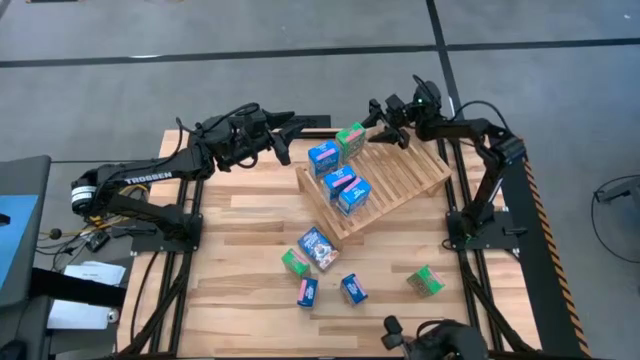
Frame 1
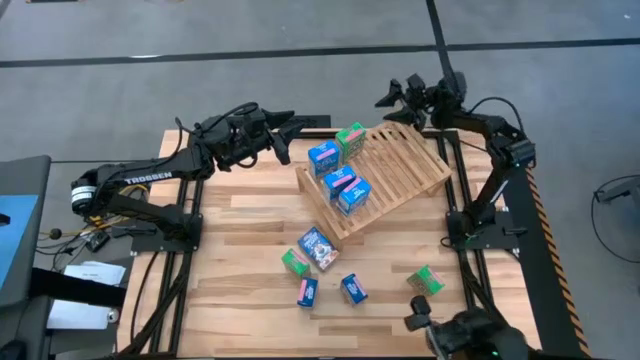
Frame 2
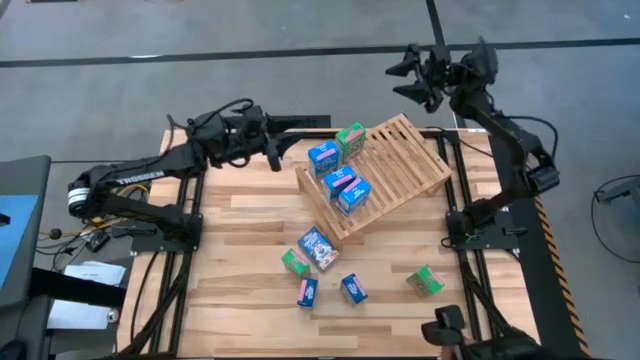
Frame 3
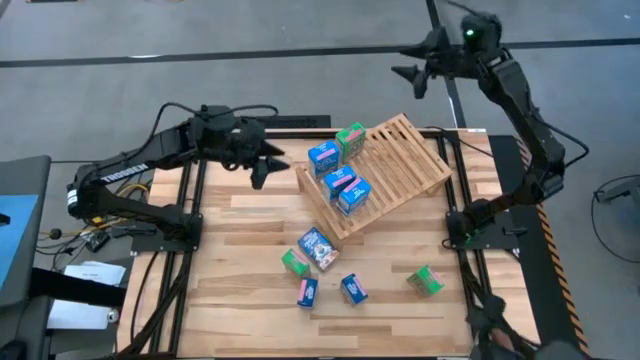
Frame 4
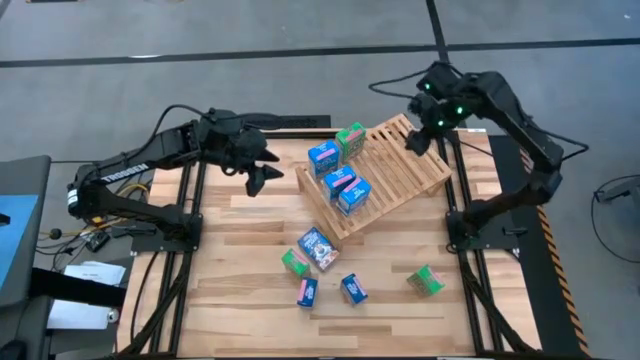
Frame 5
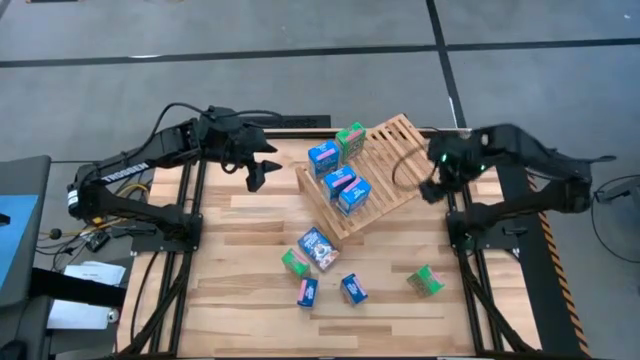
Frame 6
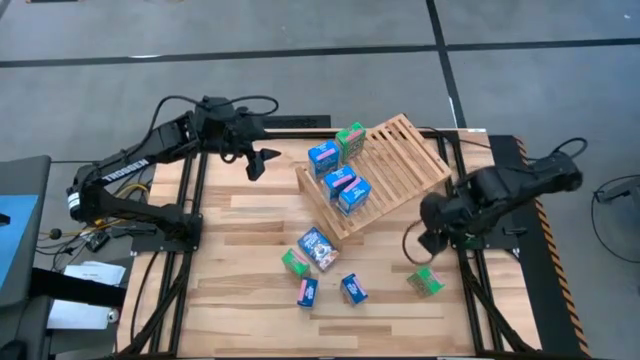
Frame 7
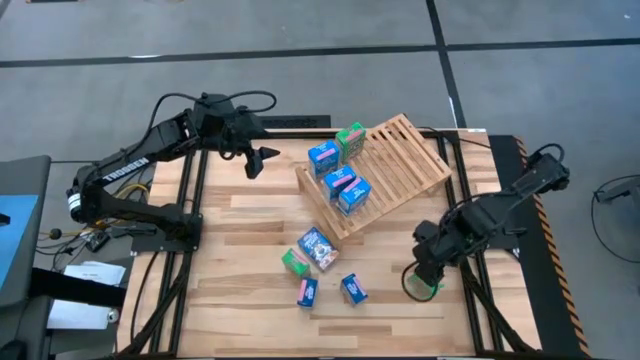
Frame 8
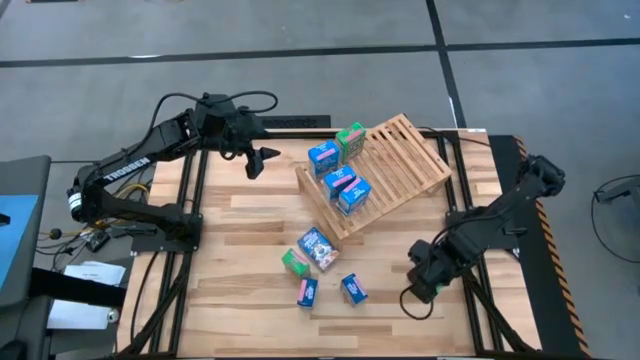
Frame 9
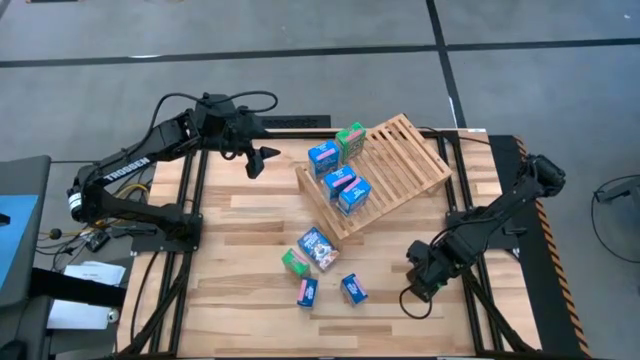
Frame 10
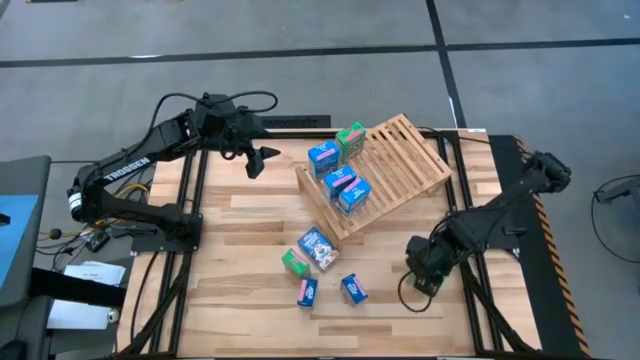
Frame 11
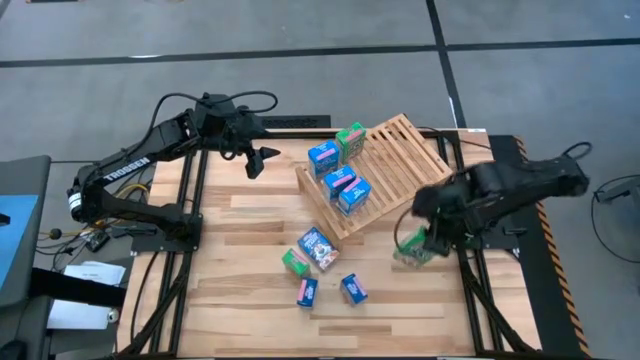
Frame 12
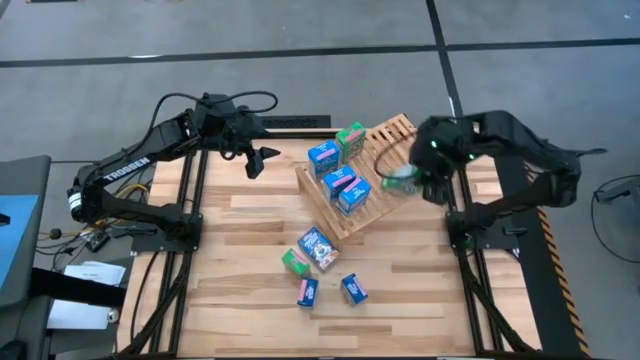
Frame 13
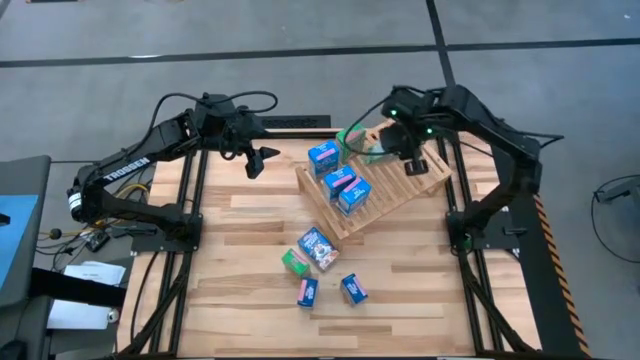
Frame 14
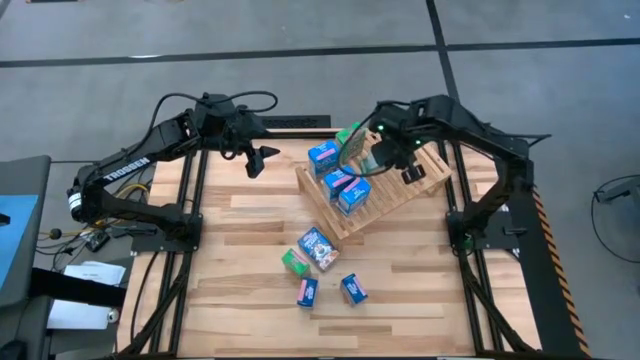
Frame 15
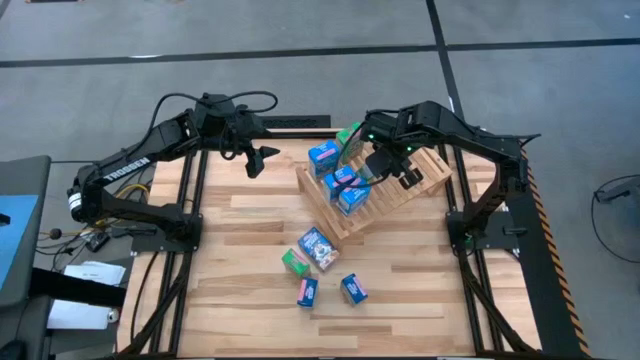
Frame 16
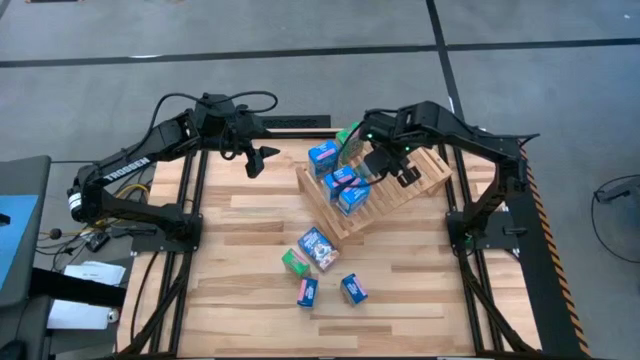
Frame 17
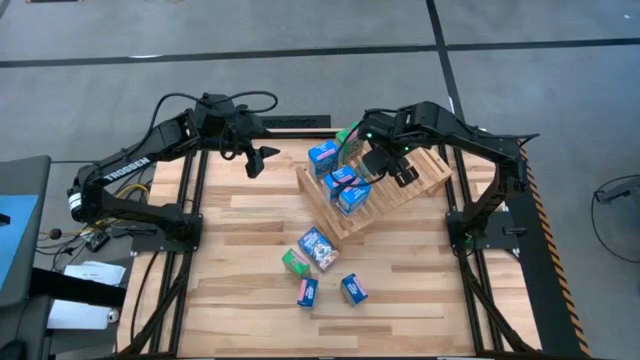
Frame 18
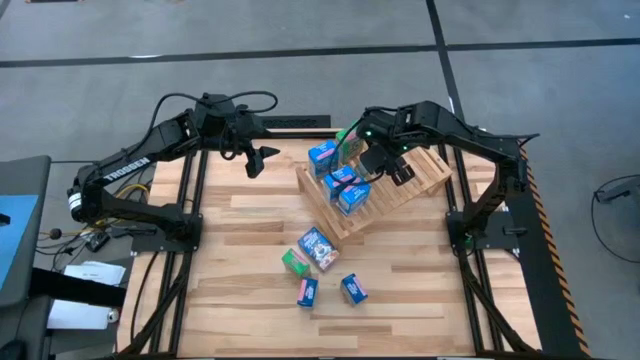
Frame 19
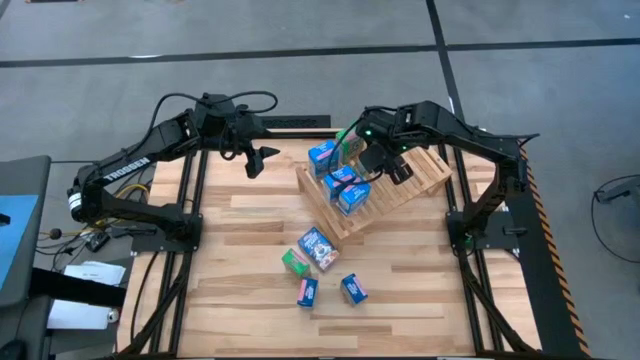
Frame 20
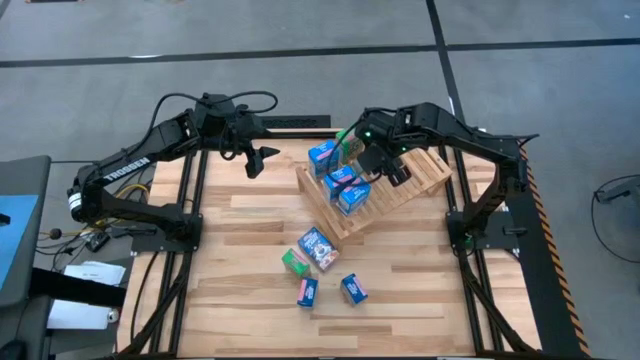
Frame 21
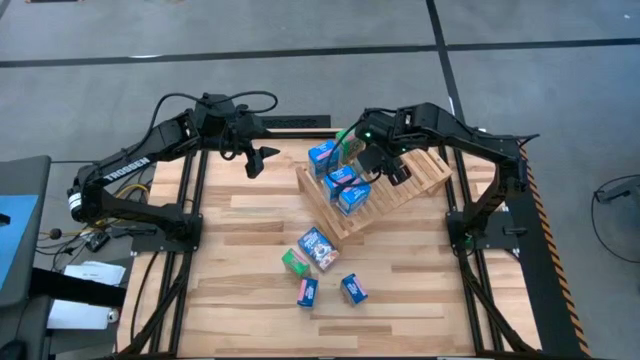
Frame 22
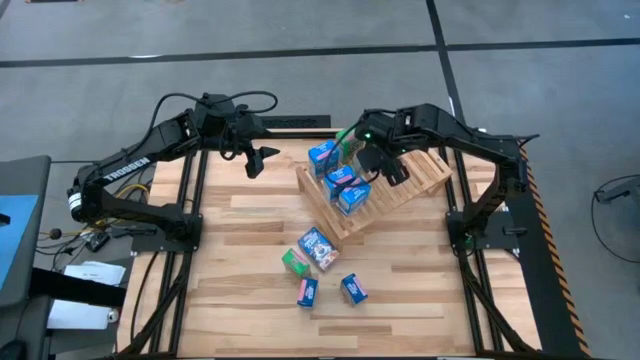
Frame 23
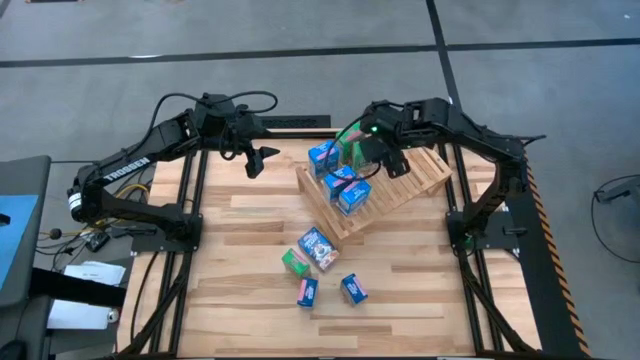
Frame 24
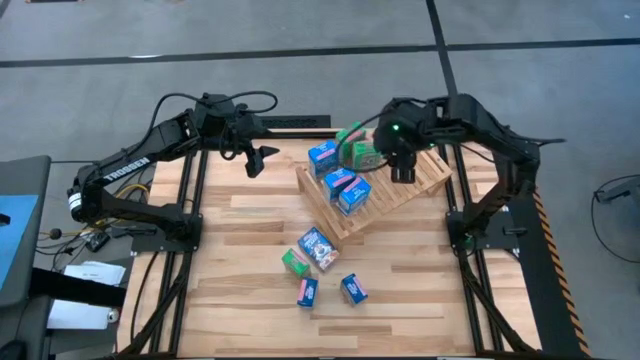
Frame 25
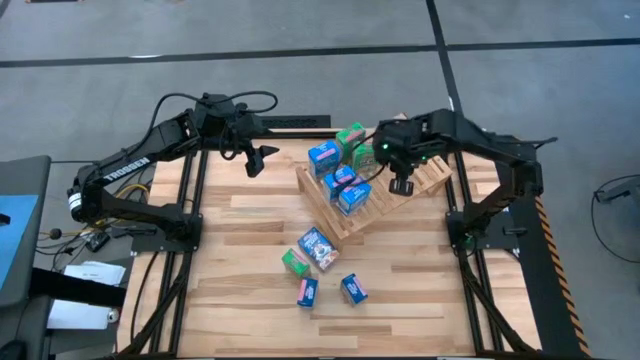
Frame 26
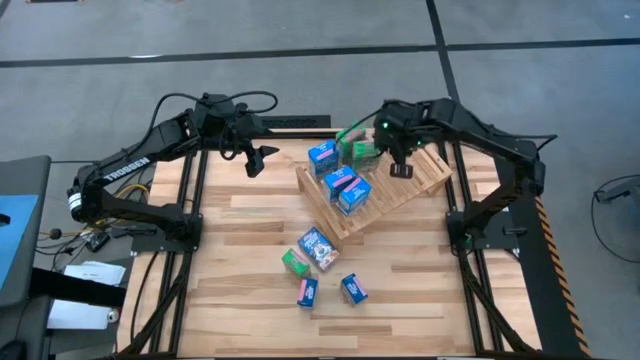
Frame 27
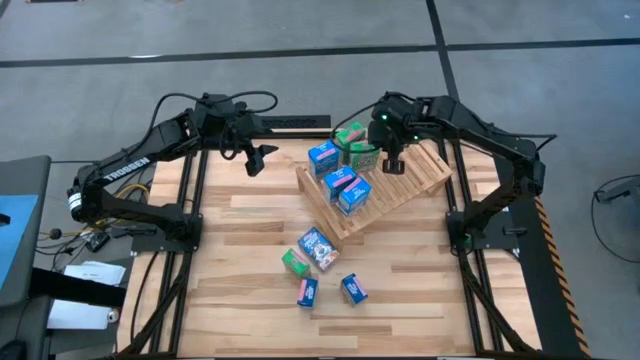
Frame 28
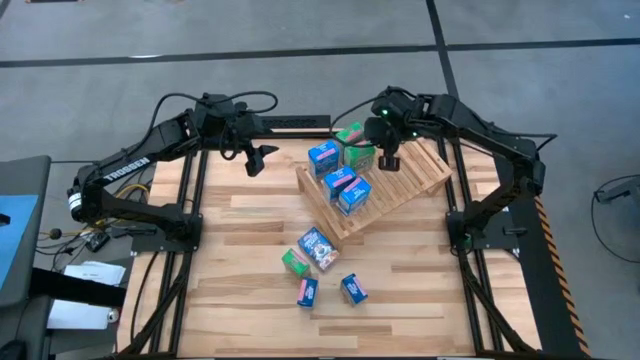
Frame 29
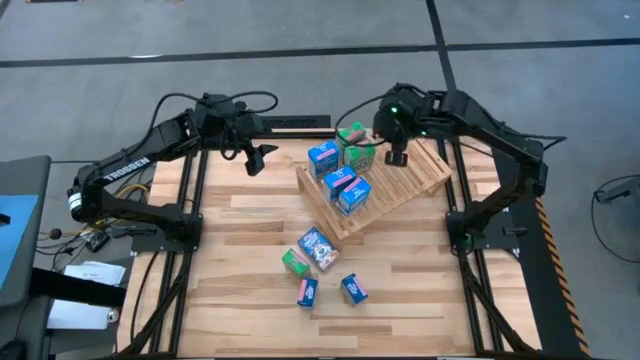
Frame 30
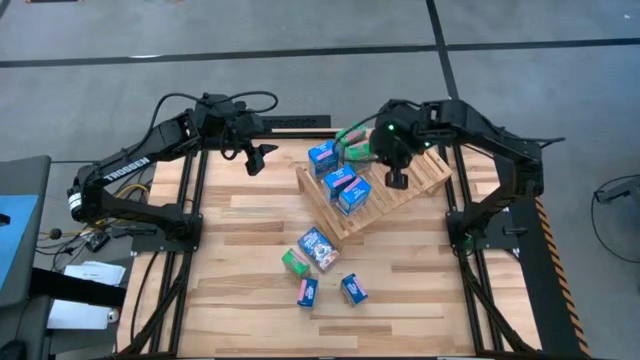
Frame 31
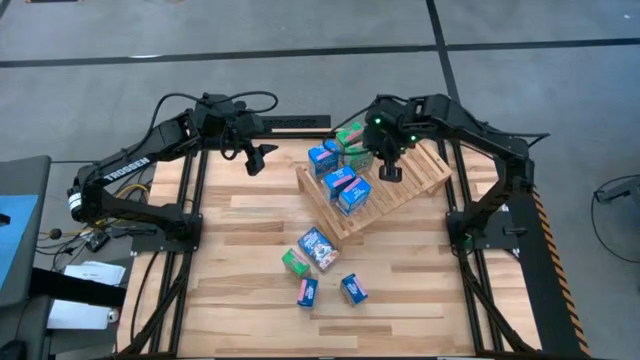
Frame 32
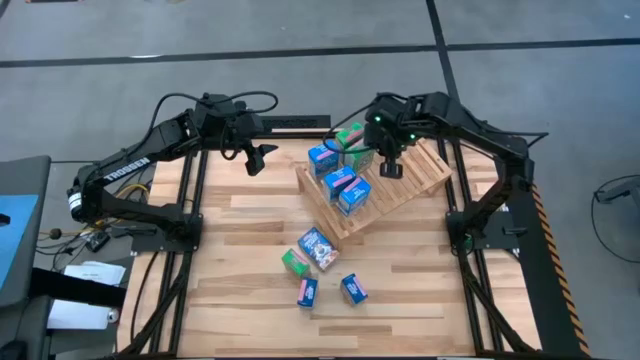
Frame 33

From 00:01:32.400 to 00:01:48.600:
Task: Stack cereal on shelf
Put the right green cereal box aligned with the other green cereal box on the shelf

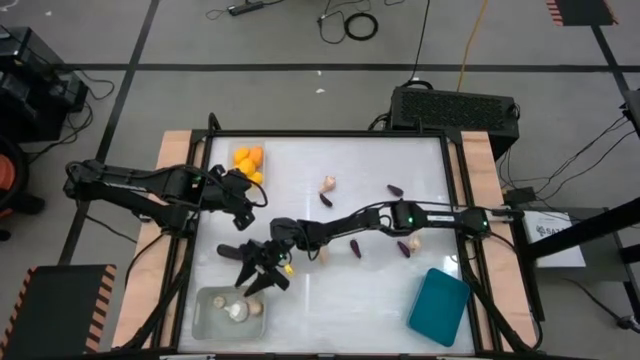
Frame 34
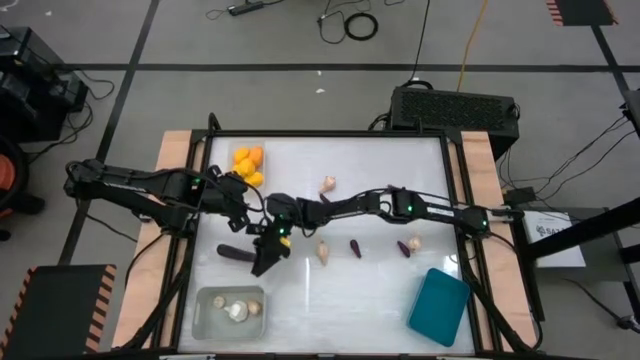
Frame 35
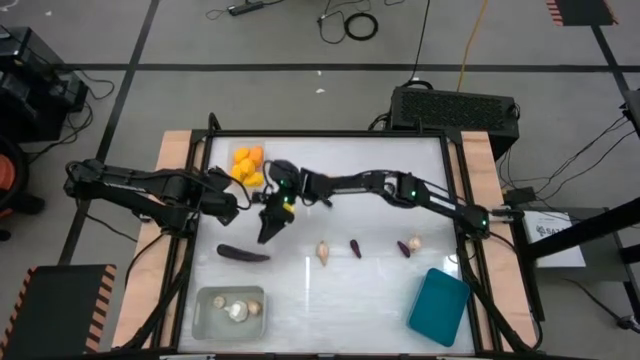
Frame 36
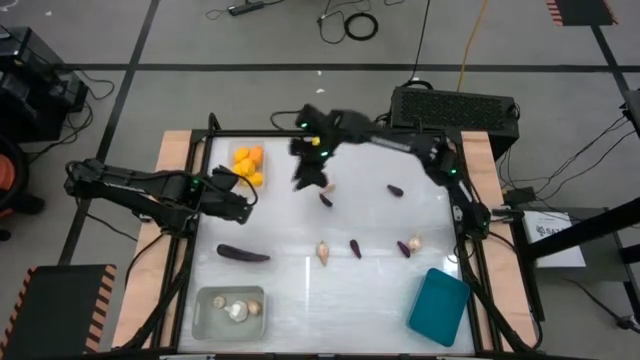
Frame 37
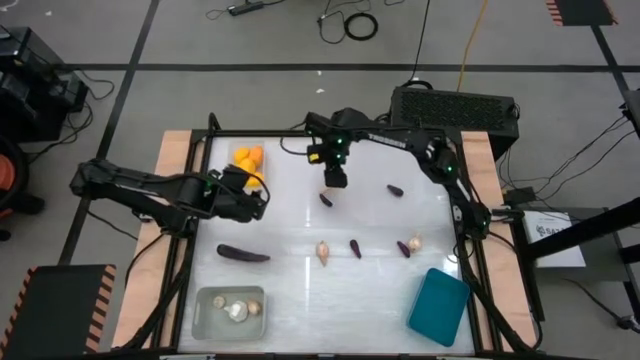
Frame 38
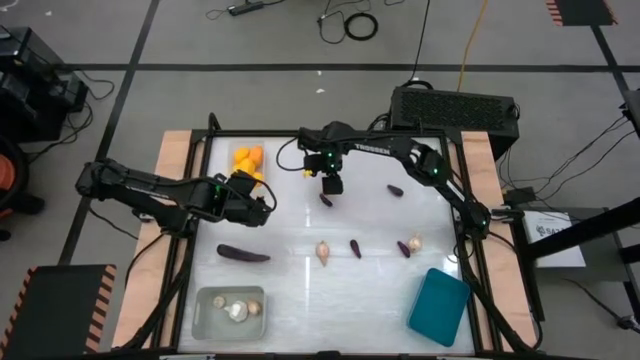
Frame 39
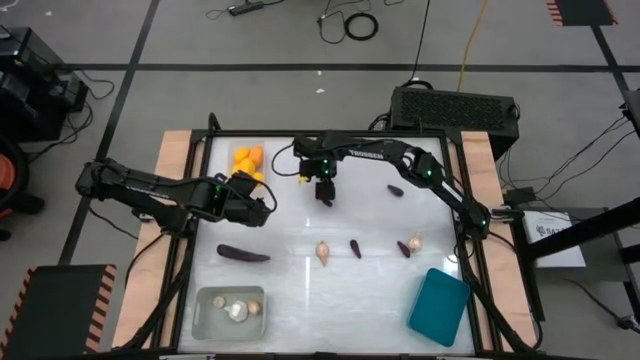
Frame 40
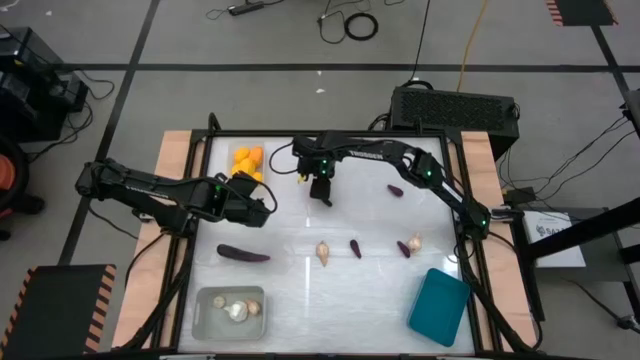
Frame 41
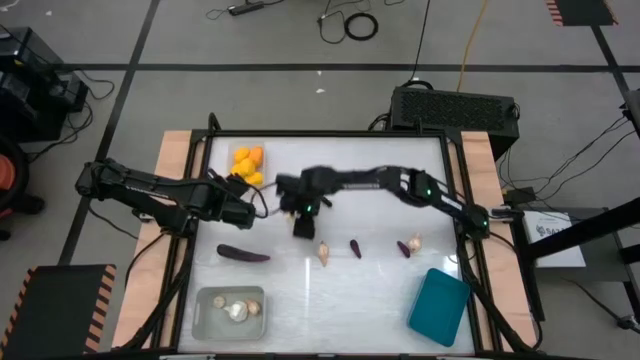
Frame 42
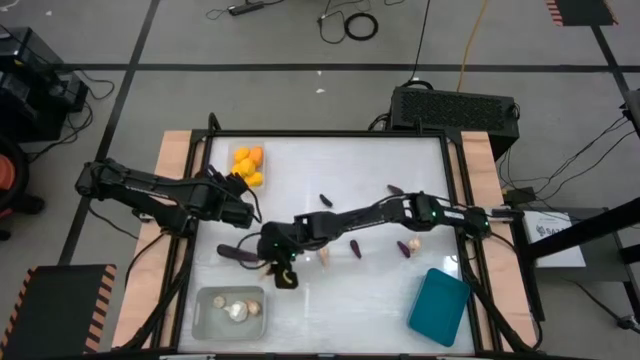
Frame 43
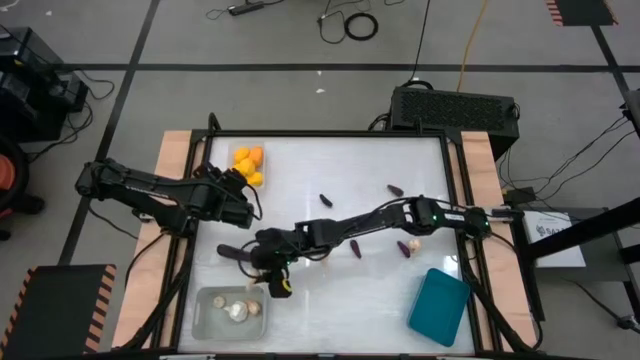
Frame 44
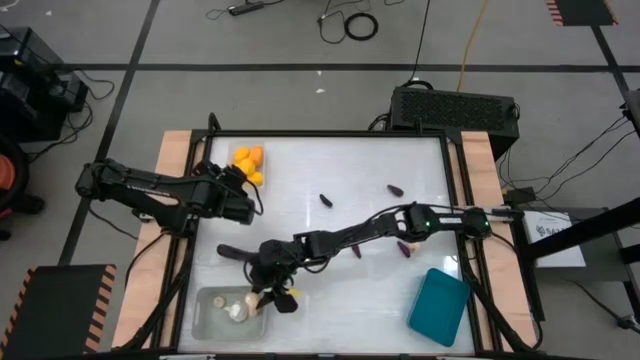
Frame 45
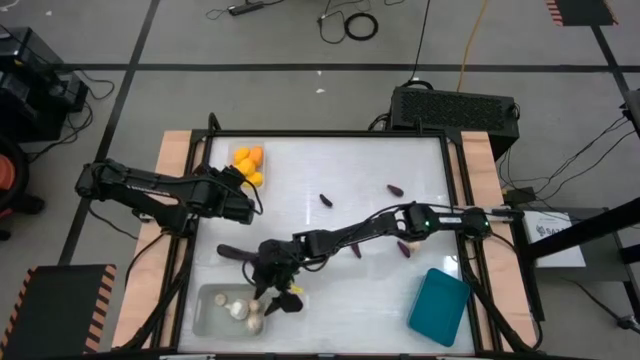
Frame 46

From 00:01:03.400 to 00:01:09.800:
Task: Sort produce into baskets
Put the white garlic into the gray bin
